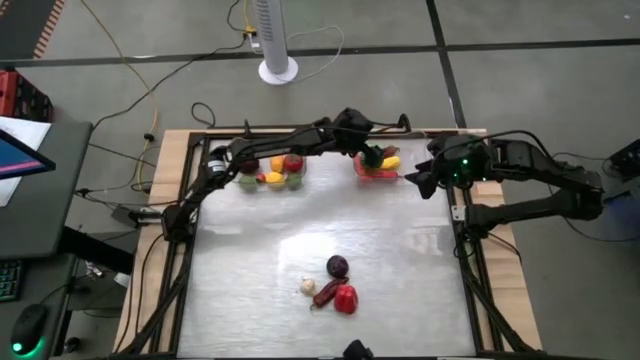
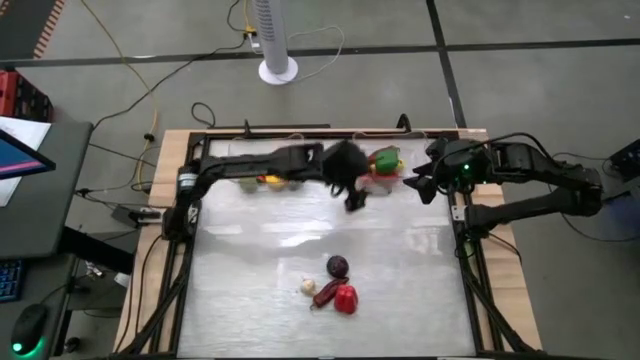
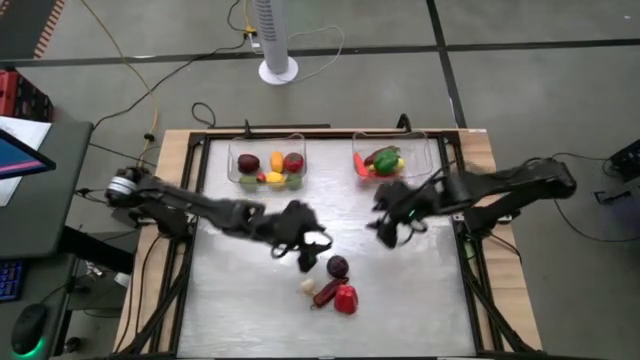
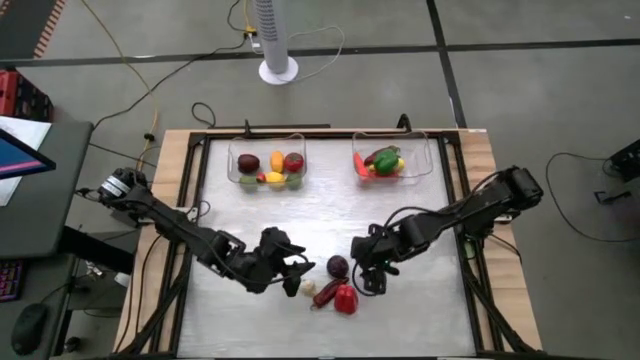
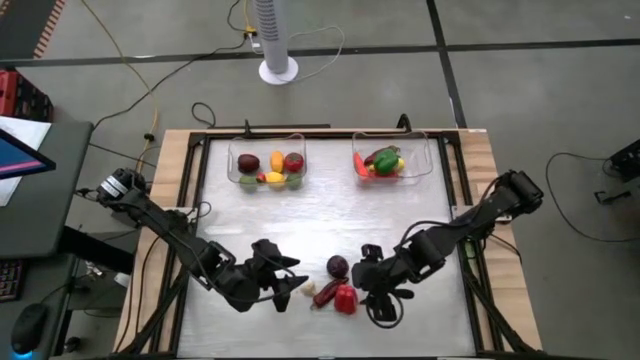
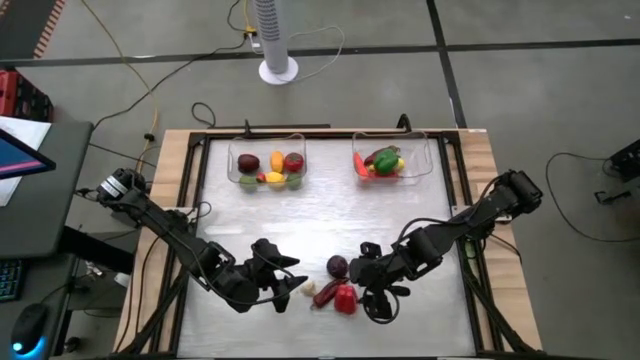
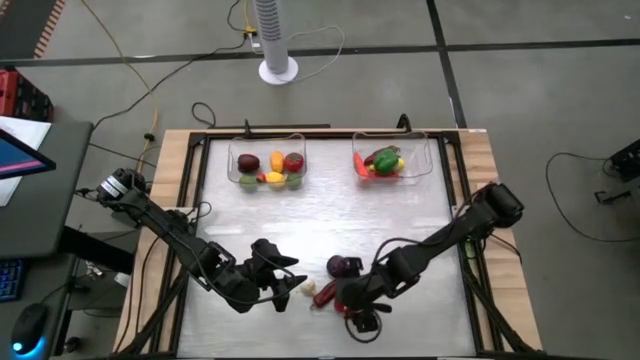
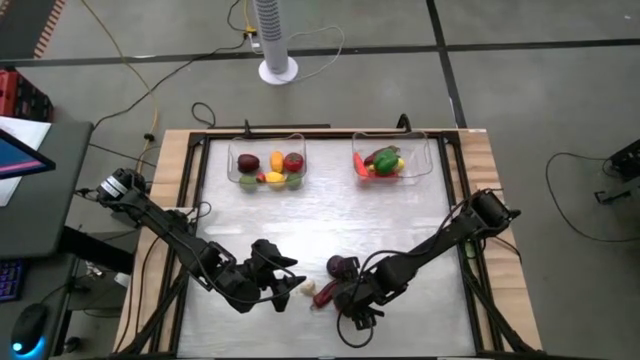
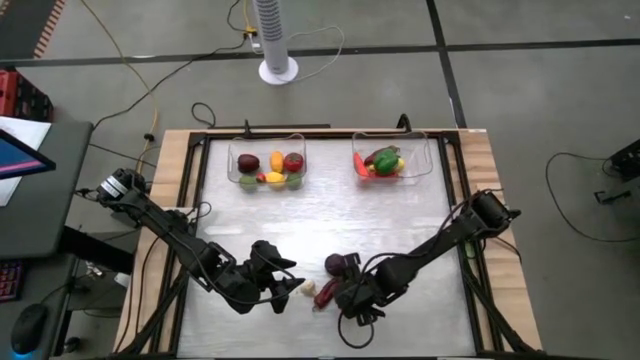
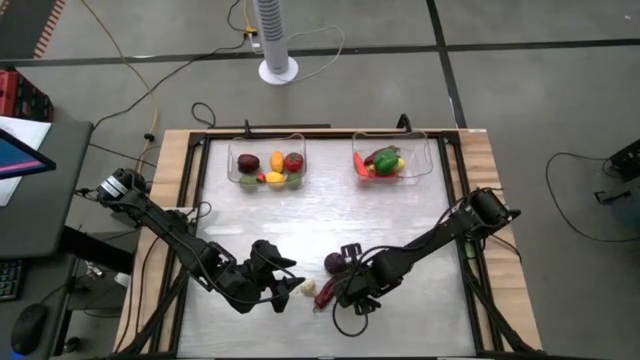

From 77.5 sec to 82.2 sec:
Task: Sort produce into baskets
Put the red bell pepper into the right transparent bin

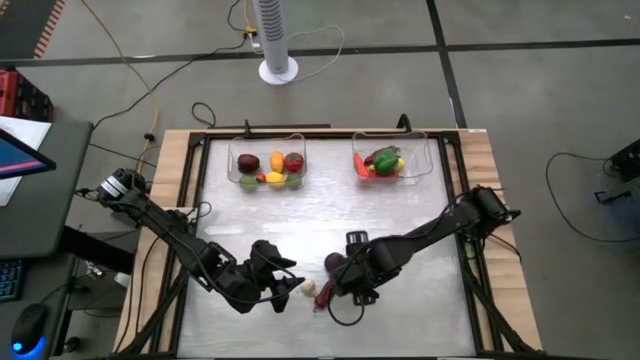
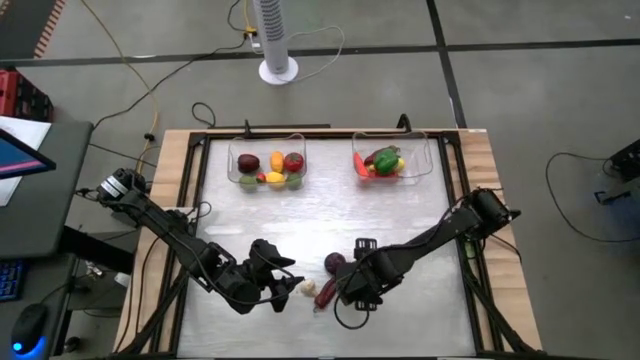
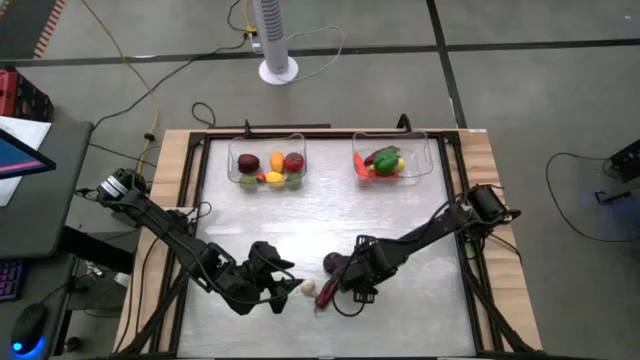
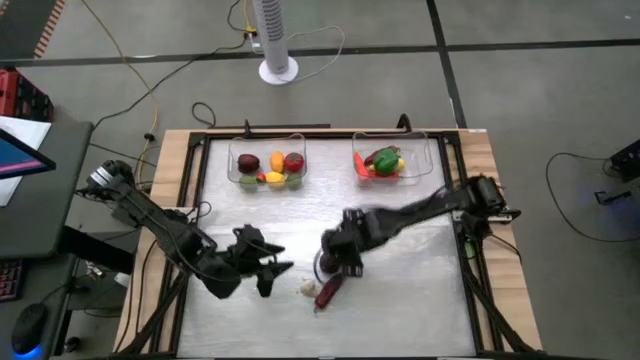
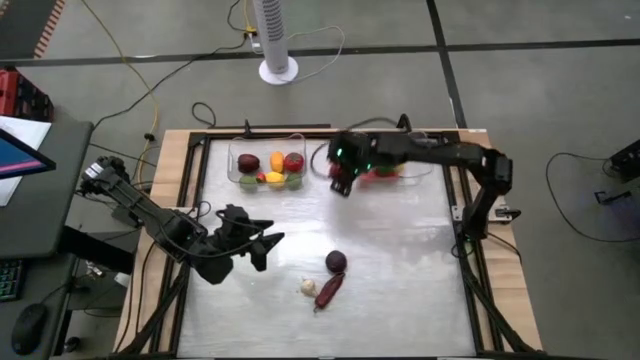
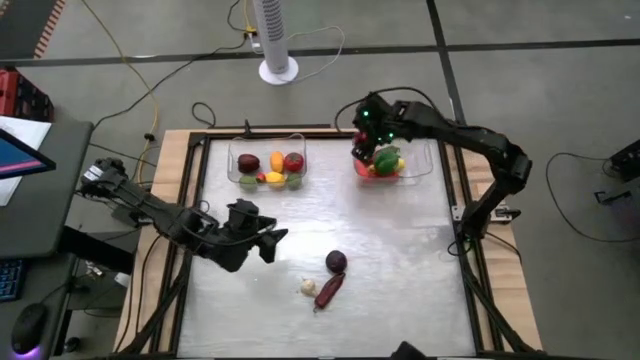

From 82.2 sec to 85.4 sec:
Put the red bell pepper into the right transparent bin

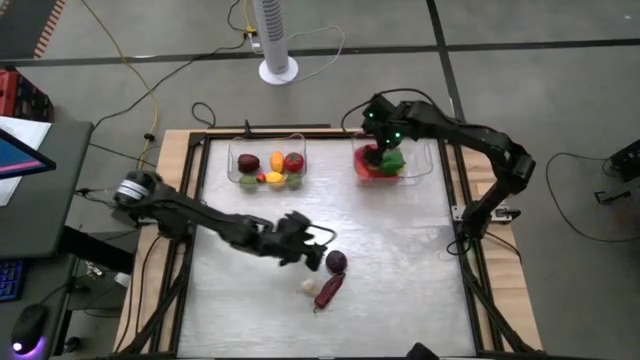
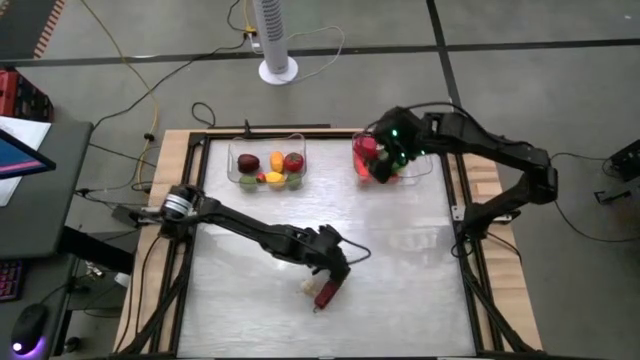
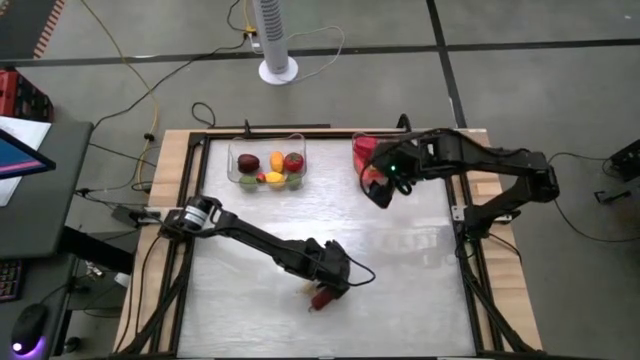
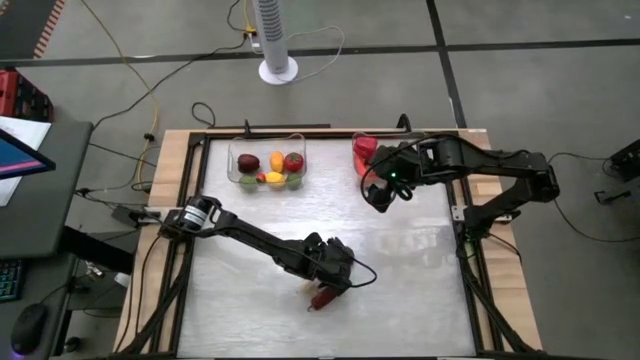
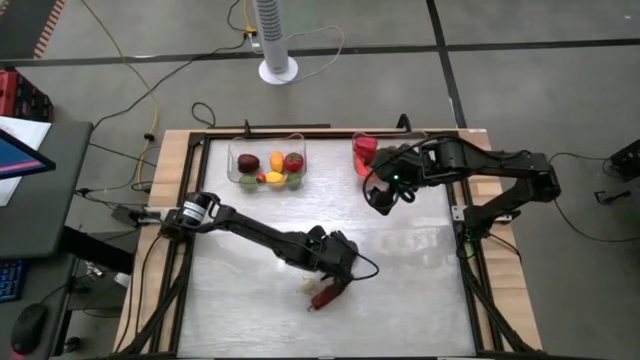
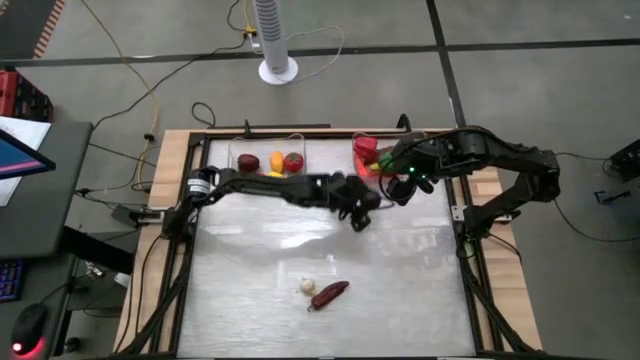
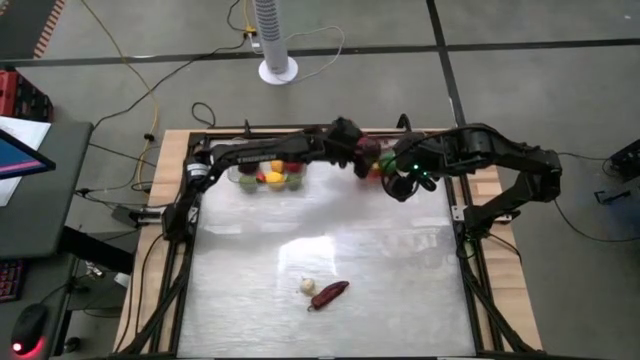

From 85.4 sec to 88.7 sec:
Put the purple onion on the right transparent bin

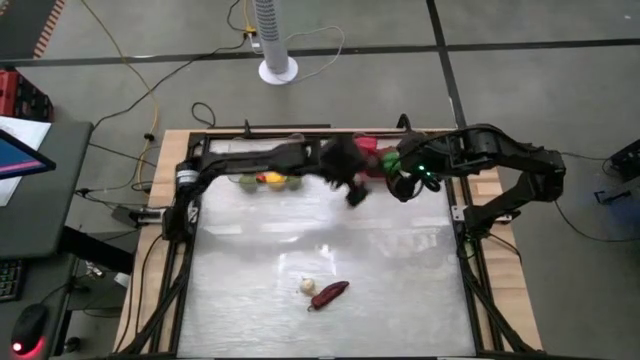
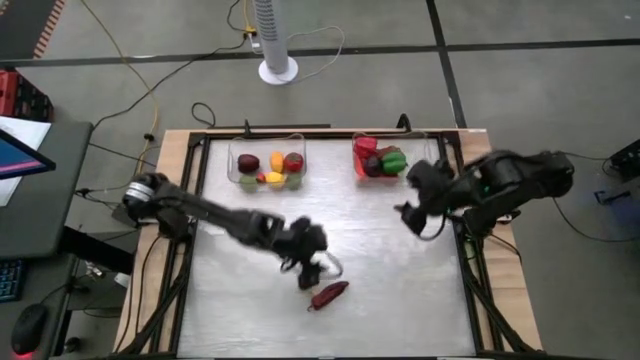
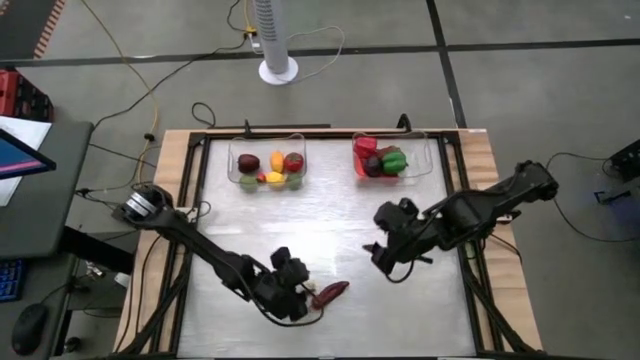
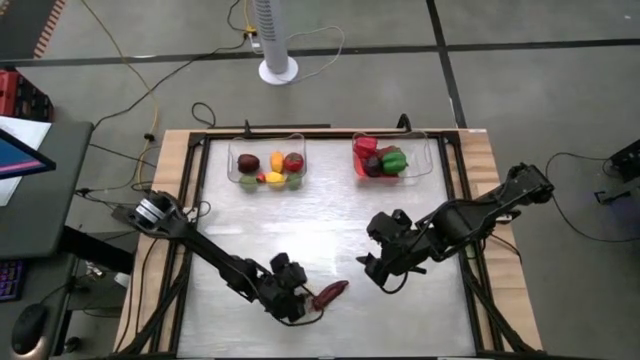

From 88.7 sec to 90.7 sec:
Put the white garlic into the right transparent bin

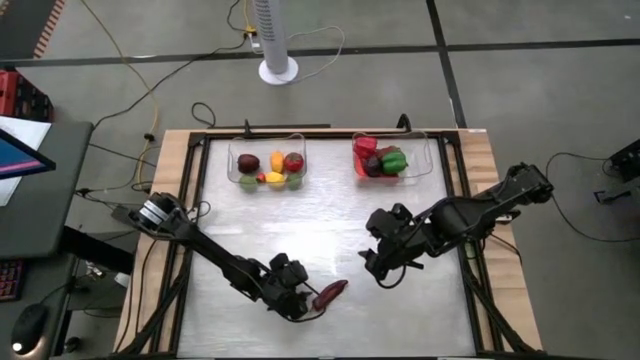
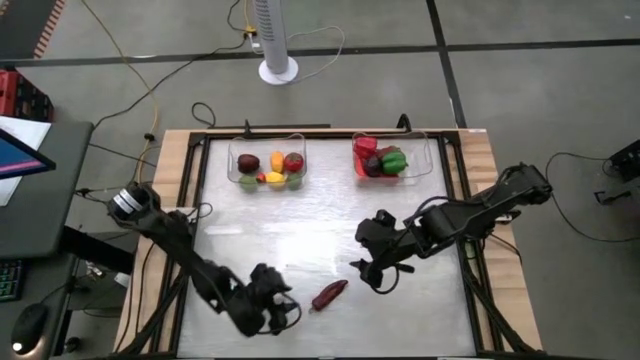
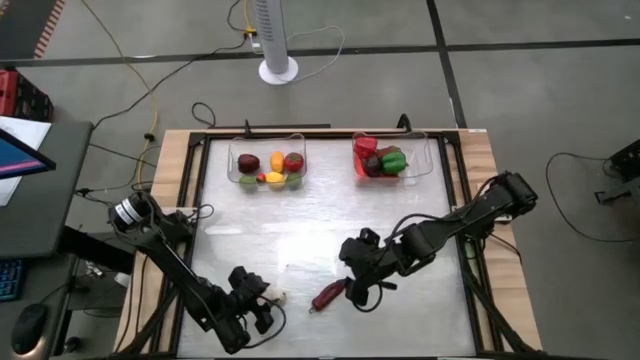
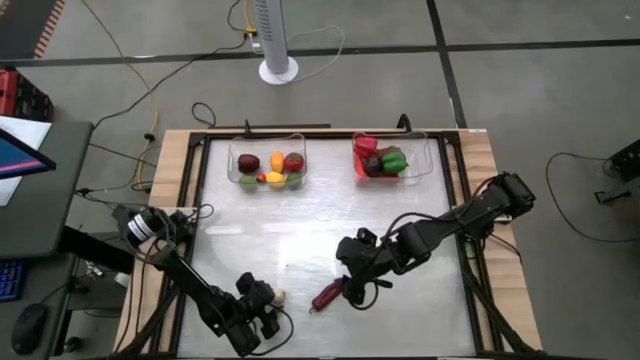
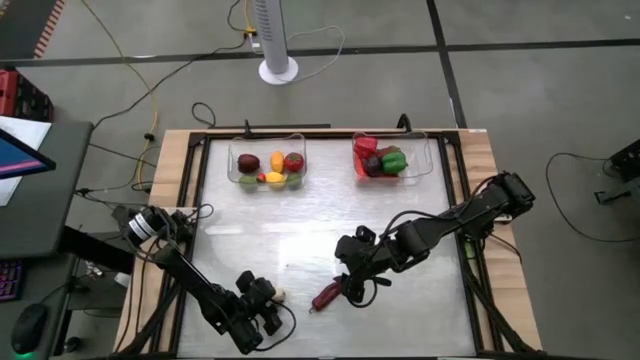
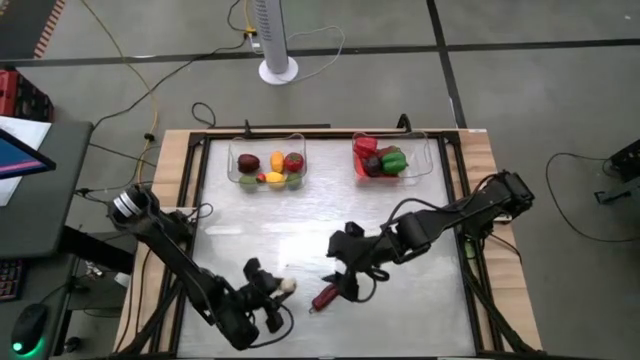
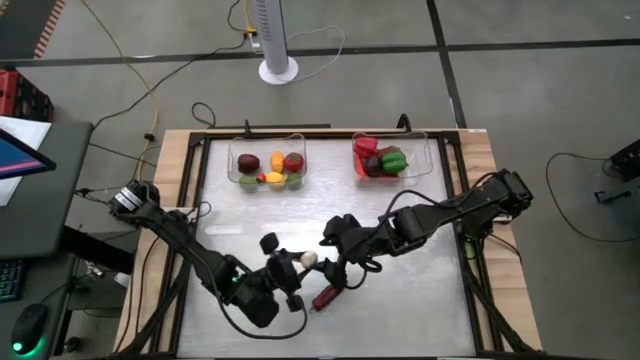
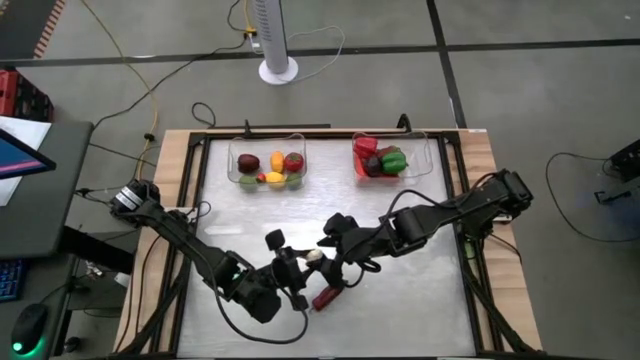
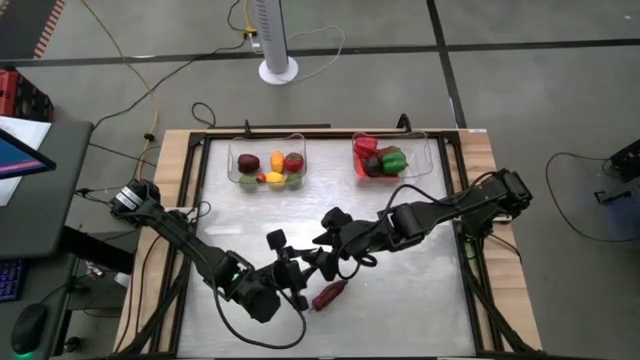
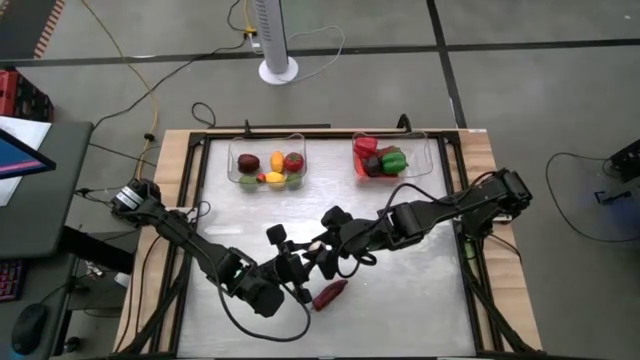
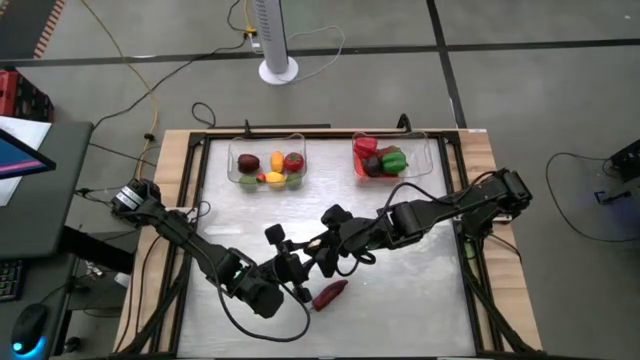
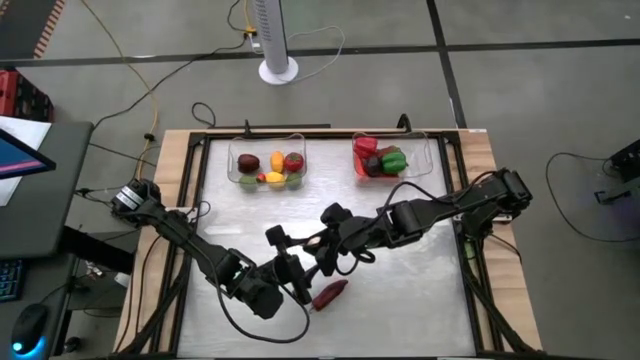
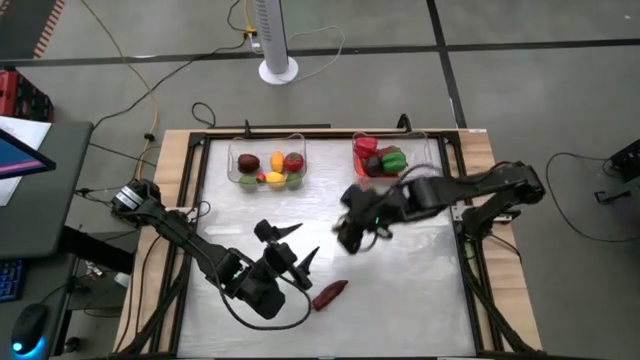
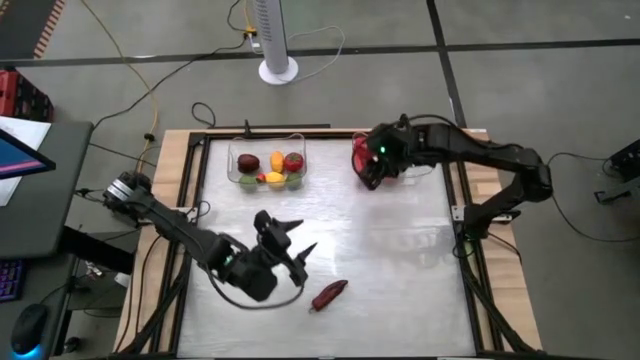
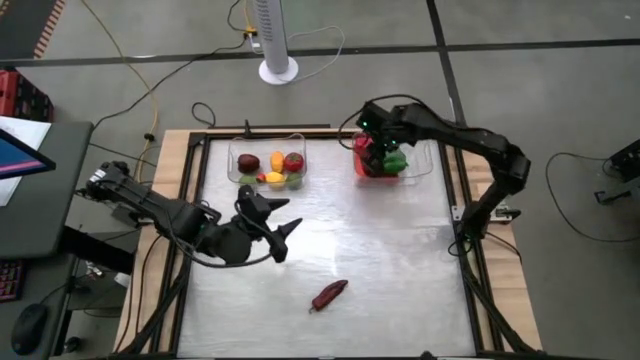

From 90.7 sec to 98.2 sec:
Put the white garlic into the right transparent bin
